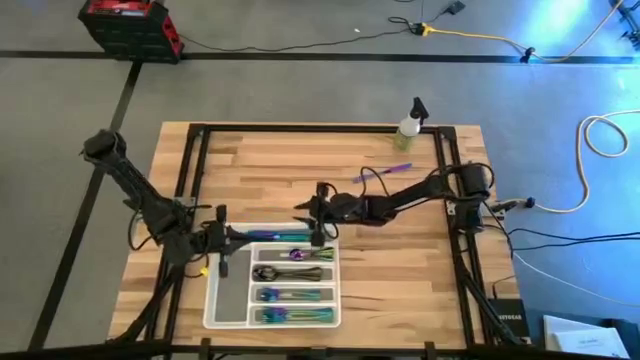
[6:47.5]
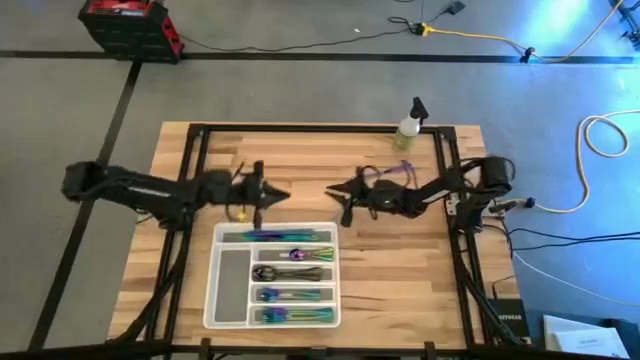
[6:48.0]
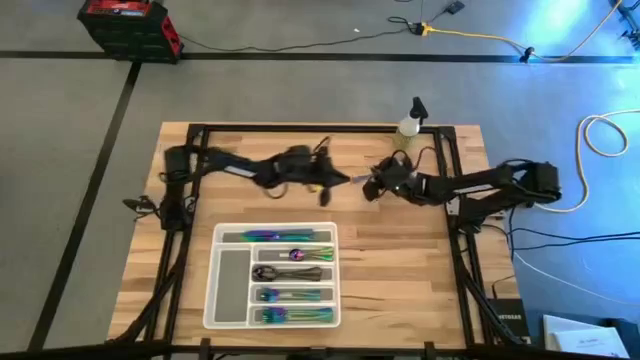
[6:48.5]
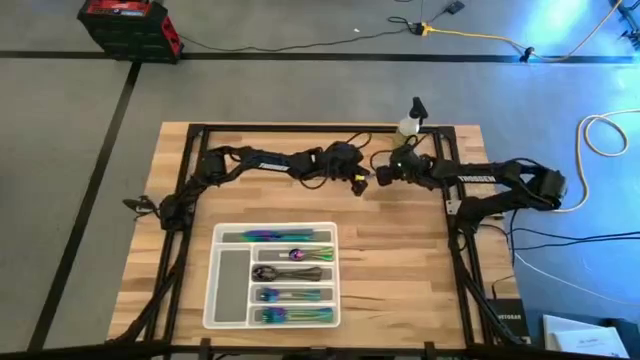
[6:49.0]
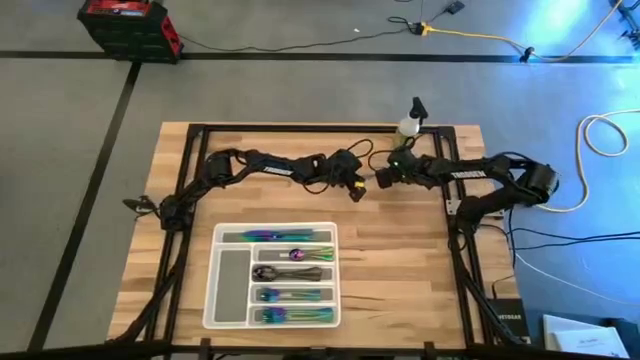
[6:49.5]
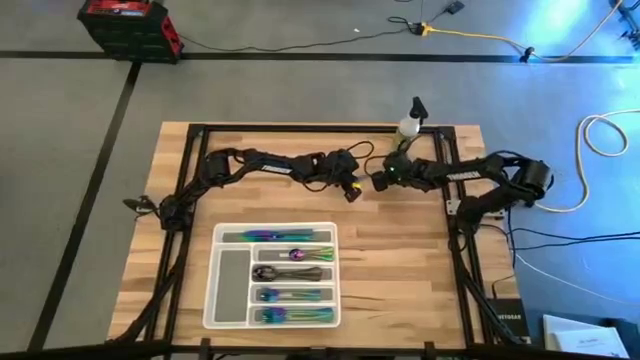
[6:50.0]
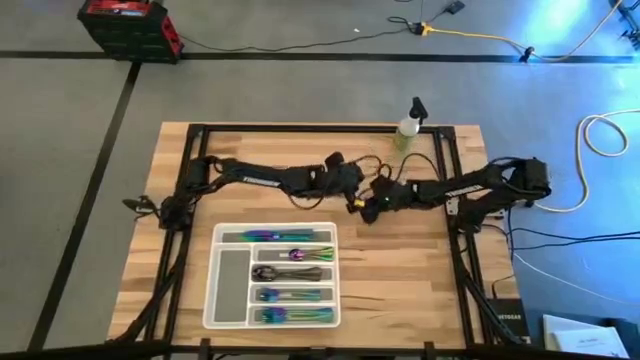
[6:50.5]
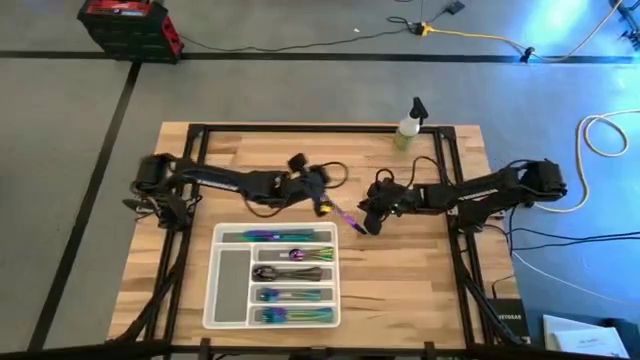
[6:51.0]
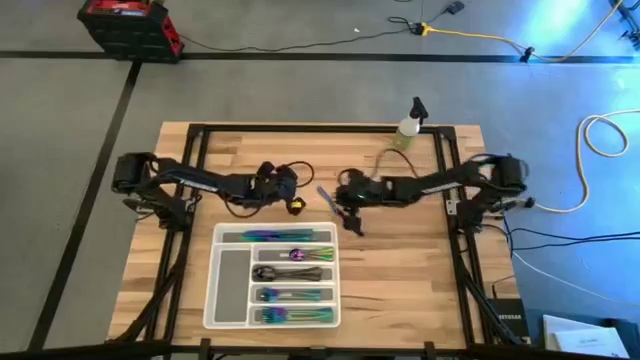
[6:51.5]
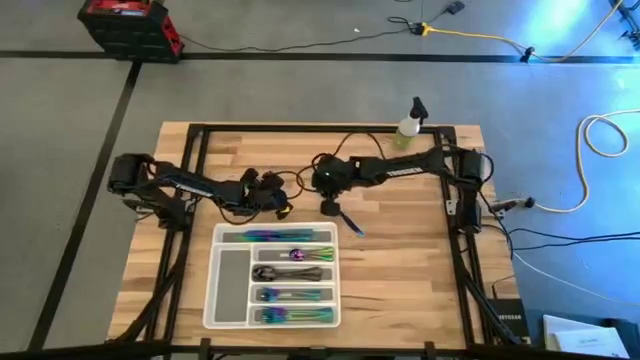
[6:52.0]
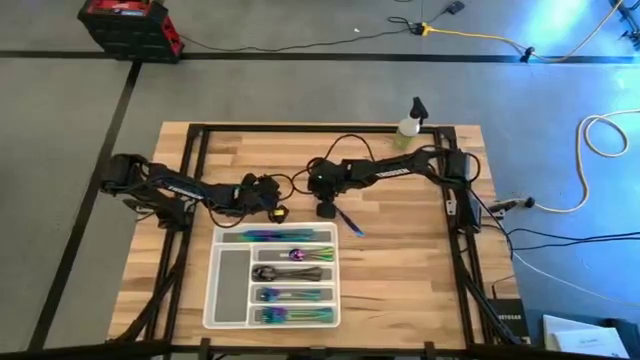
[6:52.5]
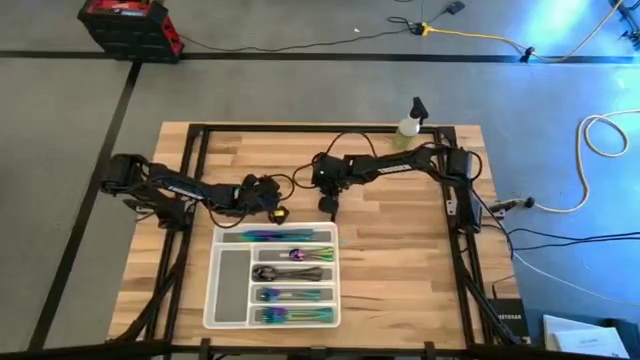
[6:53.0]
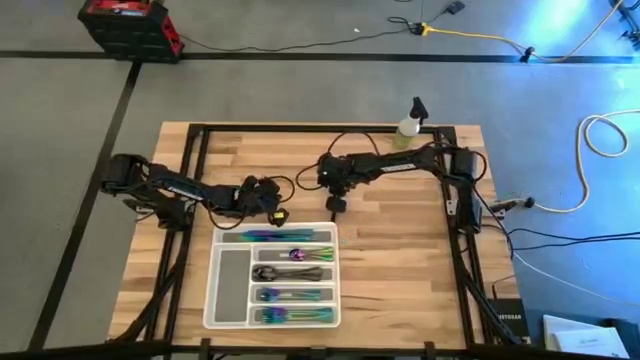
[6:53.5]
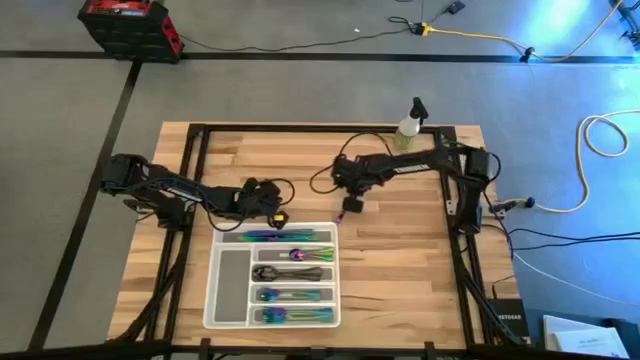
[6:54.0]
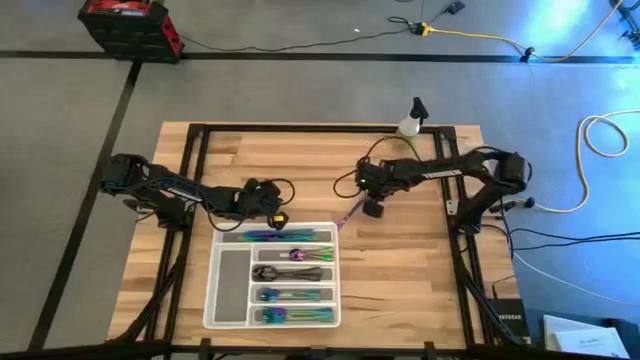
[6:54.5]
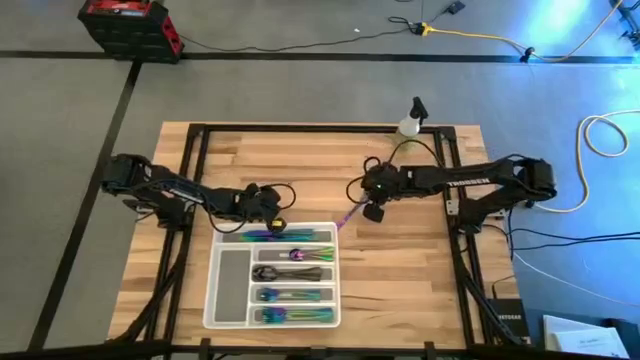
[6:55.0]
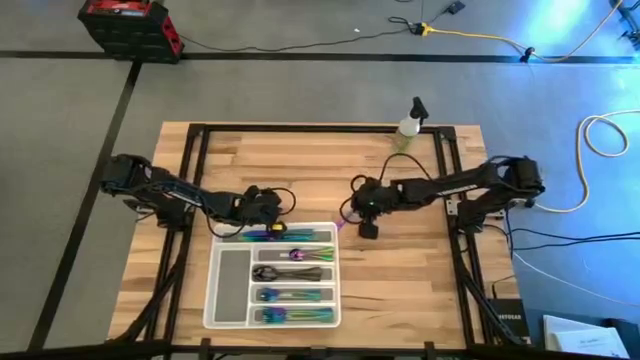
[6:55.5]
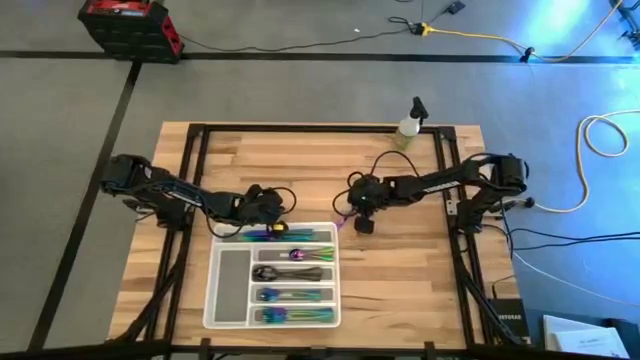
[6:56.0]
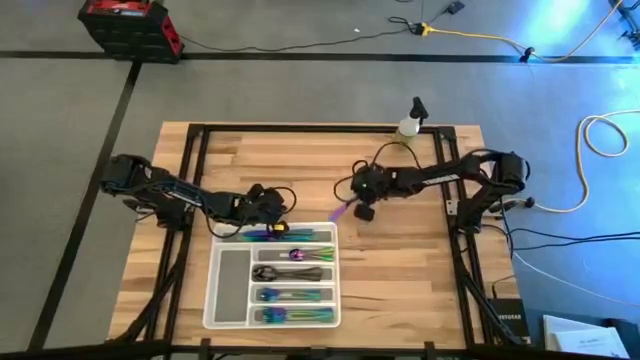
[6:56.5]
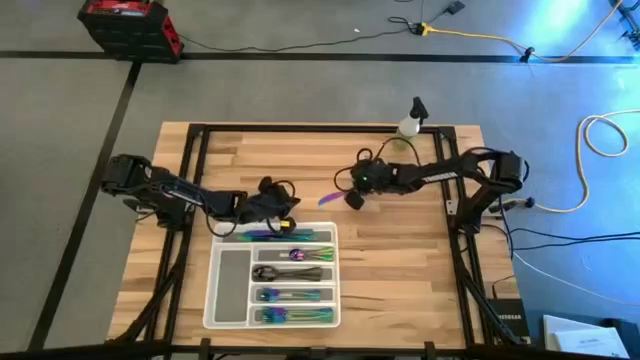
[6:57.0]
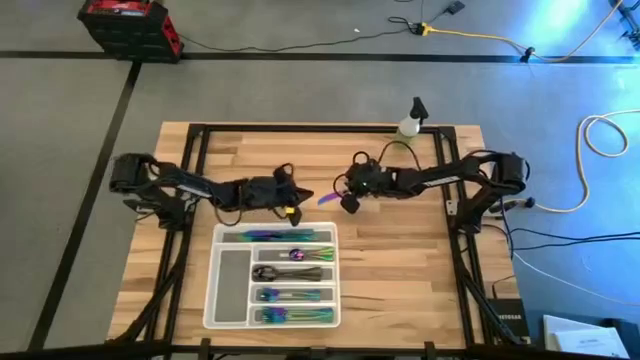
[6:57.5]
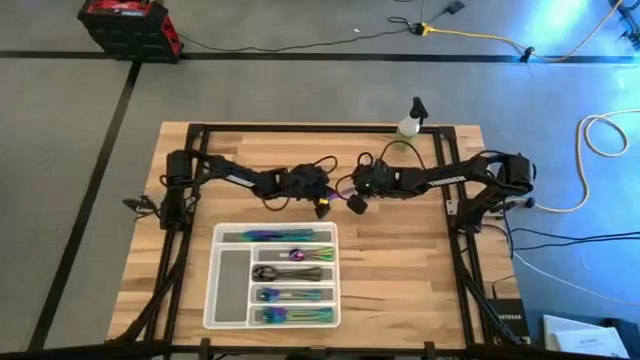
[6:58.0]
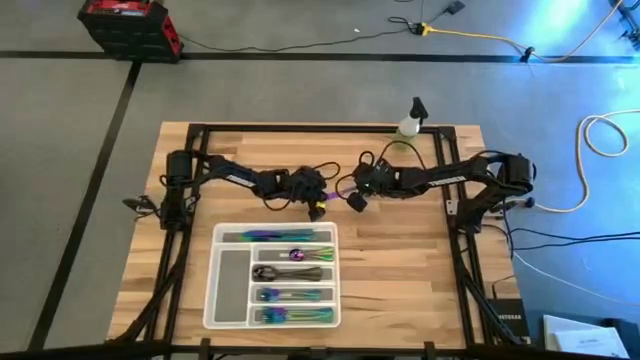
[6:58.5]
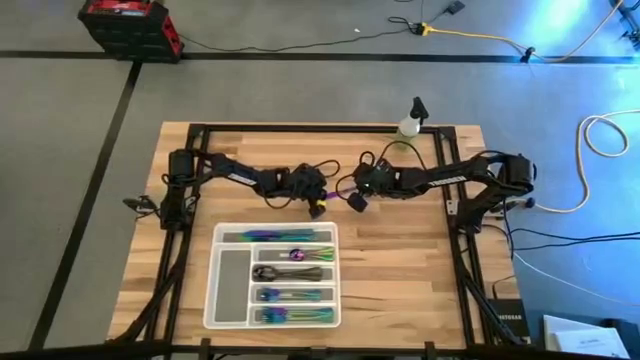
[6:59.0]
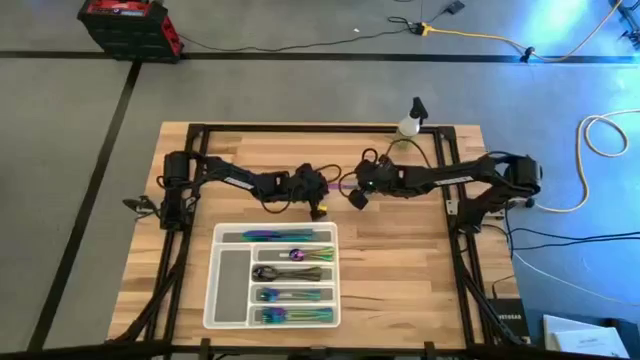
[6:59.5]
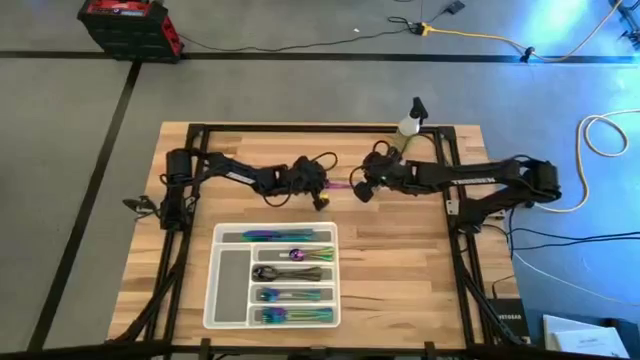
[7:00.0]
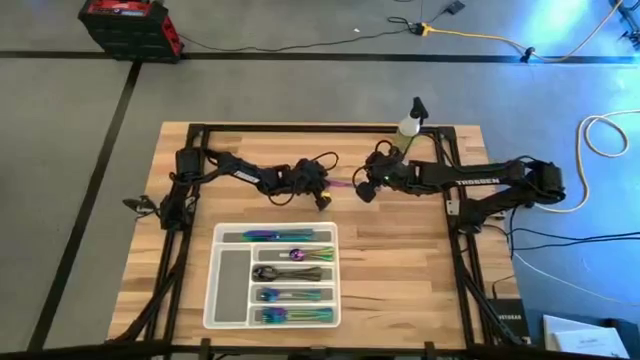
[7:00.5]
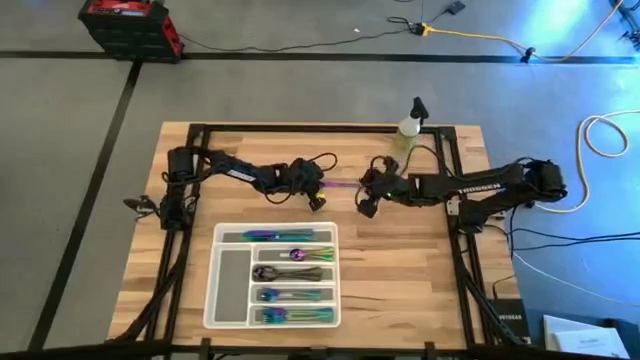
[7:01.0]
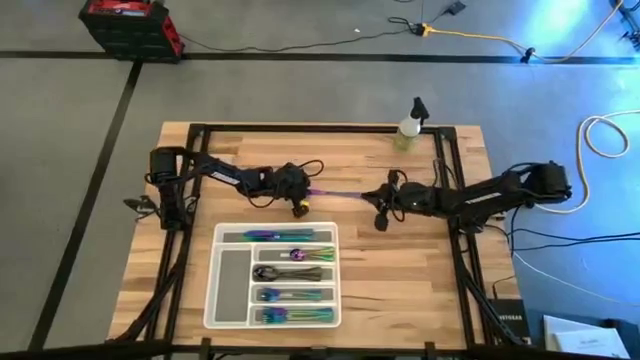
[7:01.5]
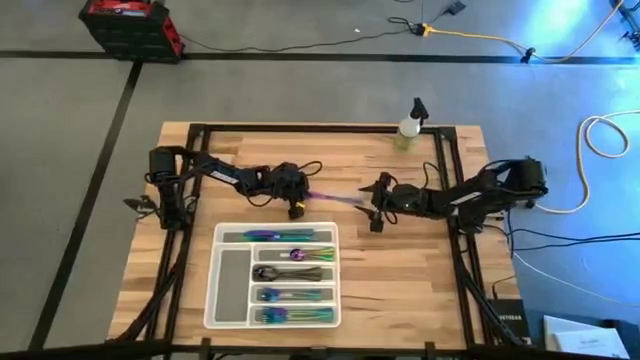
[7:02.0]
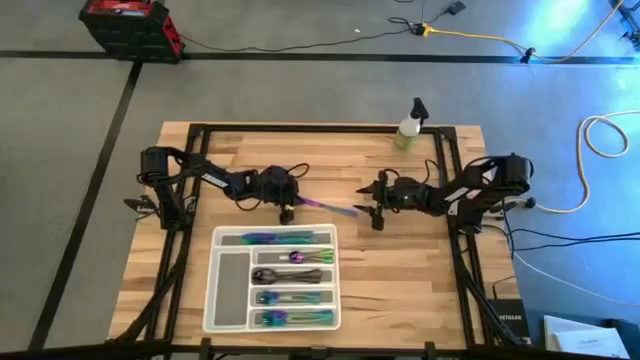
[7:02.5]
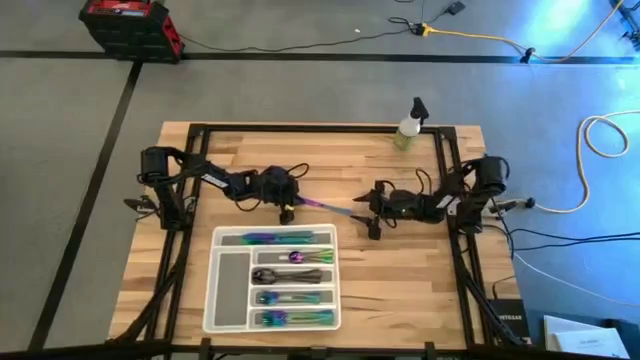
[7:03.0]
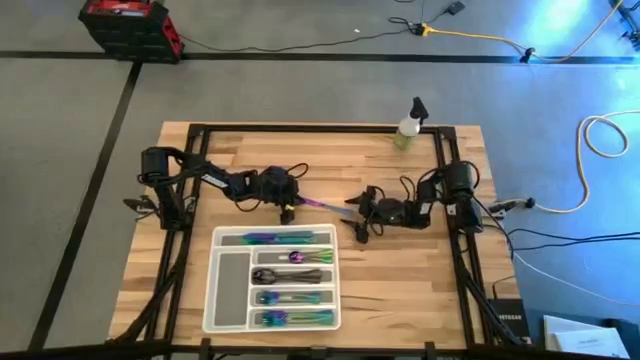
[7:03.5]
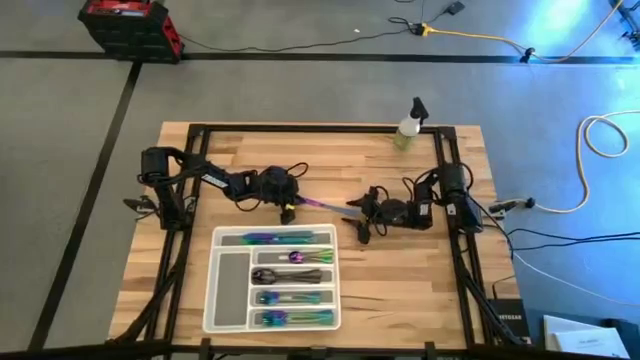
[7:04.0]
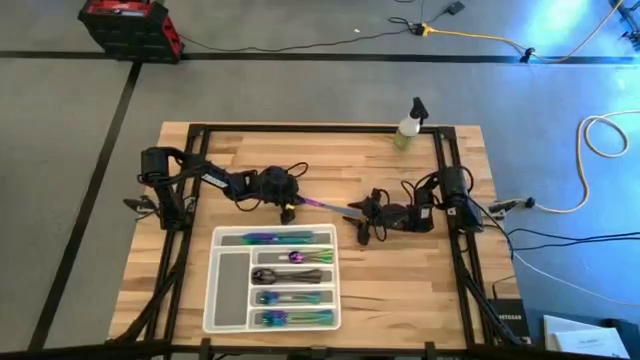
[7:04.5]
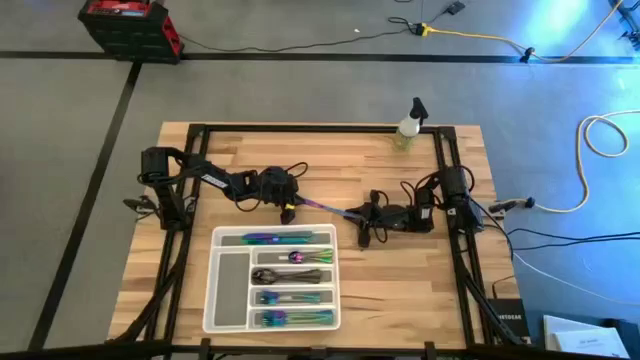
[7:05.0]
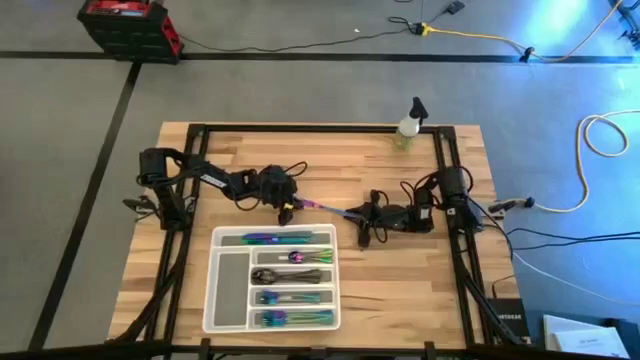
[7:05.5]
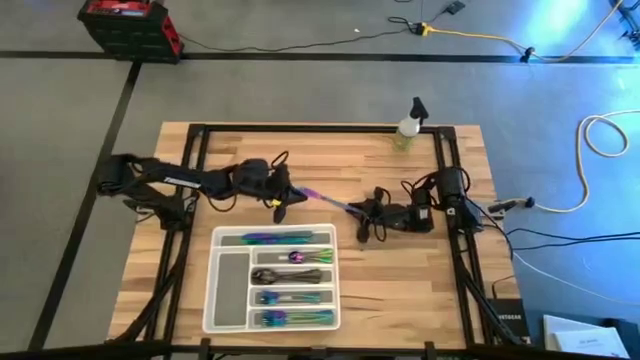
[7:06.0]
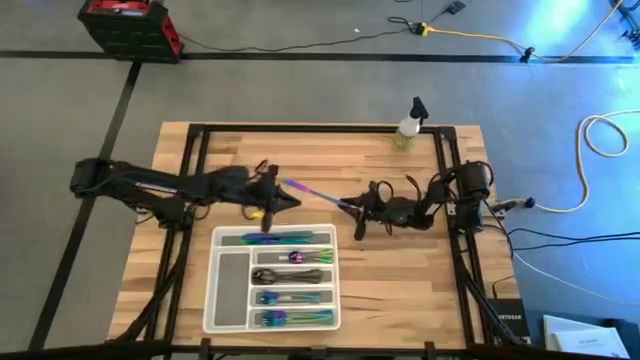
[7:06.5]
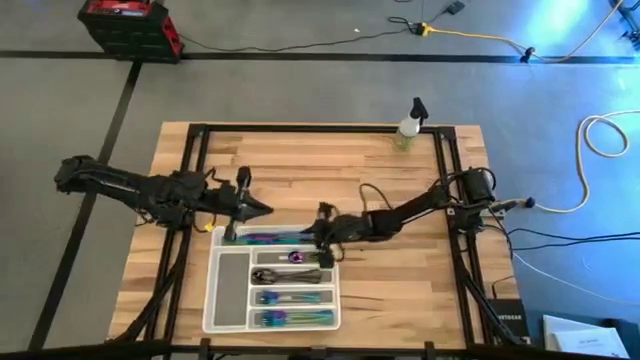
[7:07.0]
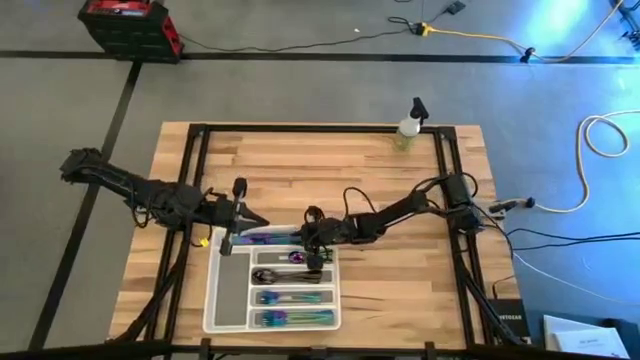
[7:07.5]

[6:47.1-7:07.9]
Task: Sort silverware
Put the blue table knife into the white silverware tray
